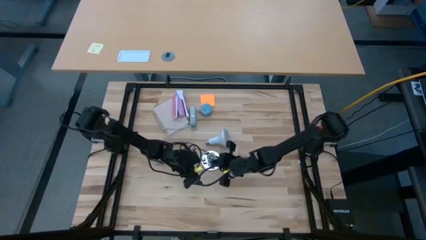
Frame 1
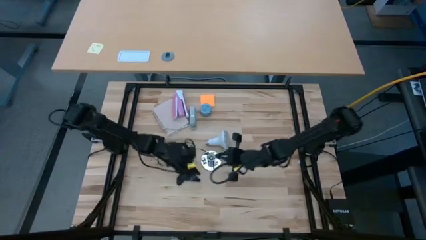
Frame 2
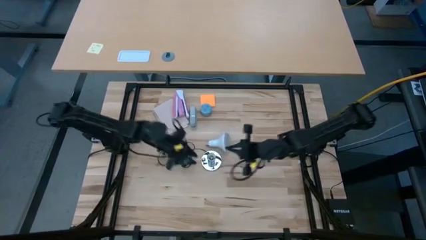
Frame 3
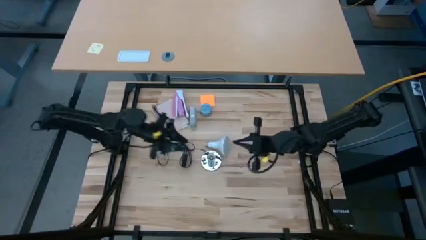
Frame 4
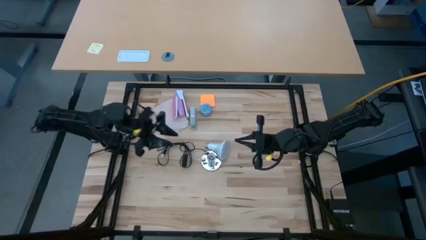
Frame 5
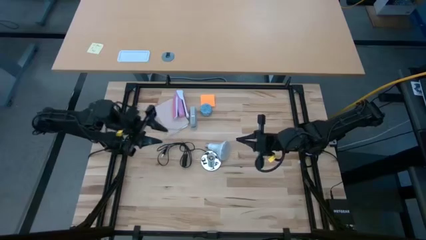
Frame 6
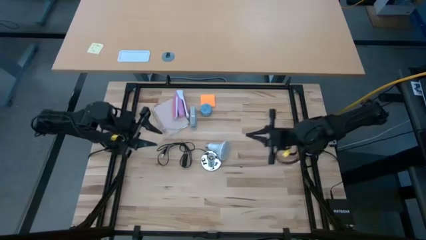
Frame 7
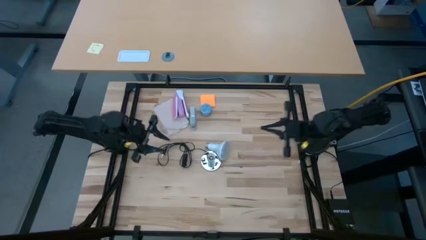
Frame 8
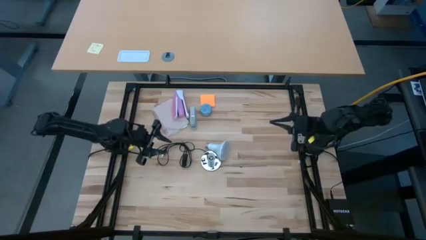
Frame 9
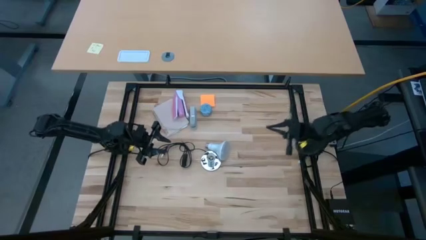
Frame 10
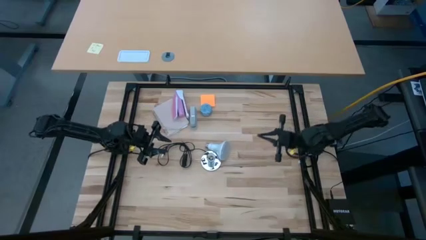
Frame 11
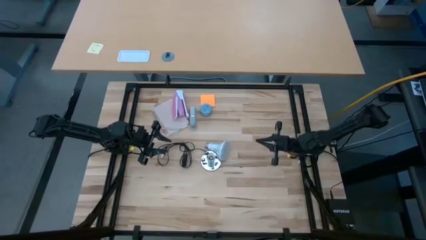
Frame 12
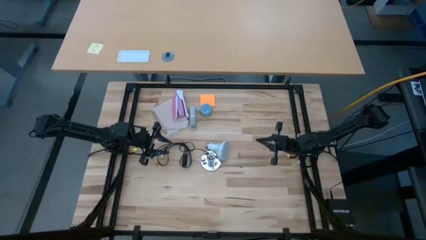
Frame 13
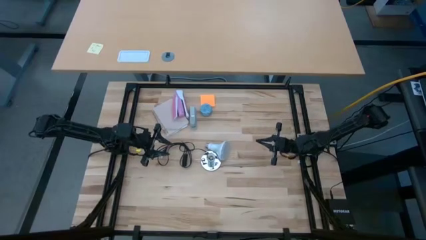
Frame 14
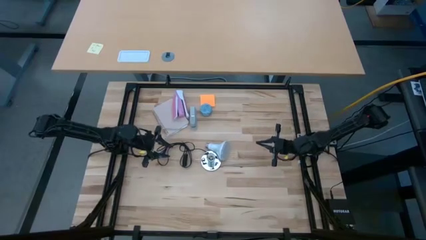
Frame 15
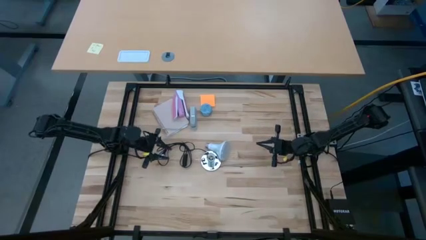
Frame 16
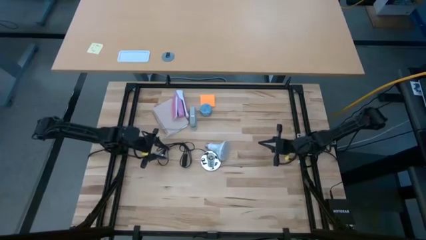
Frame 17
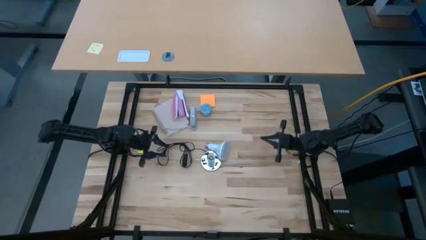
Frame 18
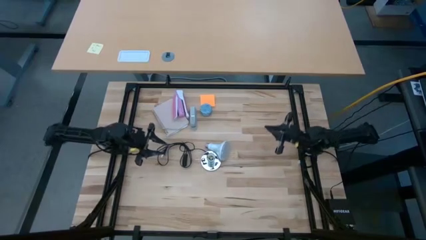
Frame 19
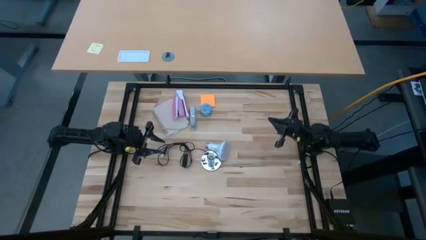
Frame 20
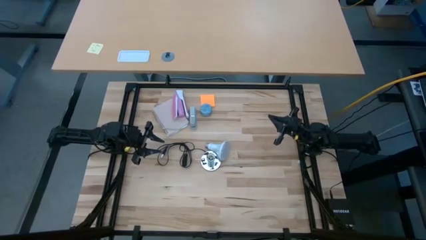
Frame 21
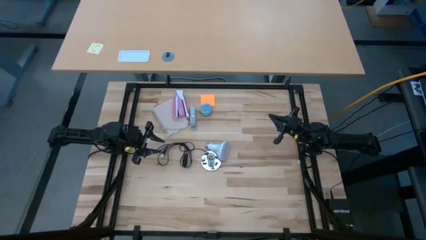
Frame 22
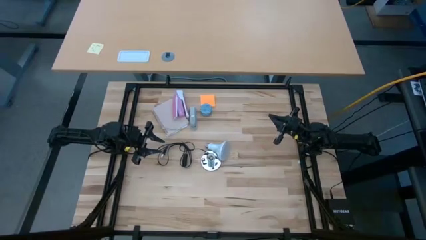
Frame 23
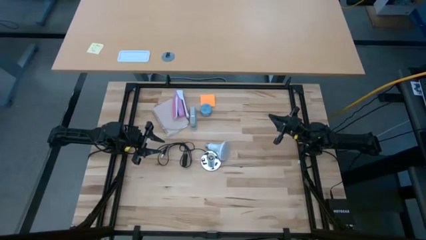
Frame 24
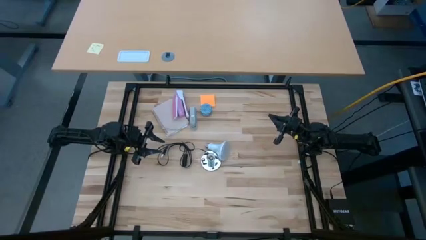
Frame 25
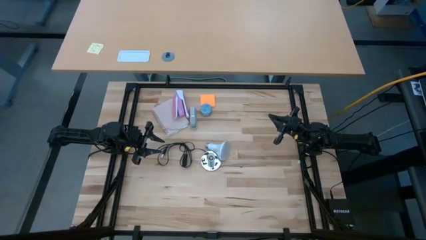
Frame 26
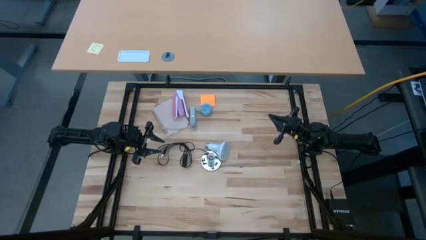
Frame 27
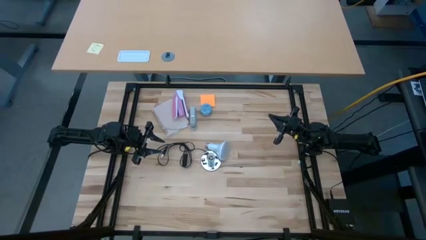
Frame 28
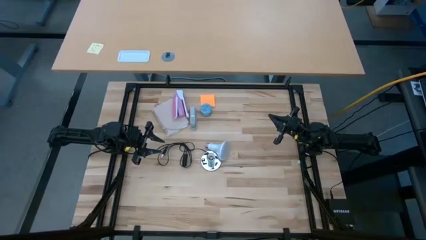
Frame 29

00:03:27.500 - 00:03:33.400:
Task: Screw lightbulb
Return to Home Position

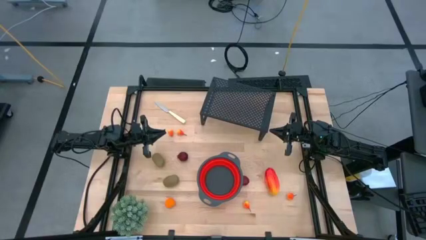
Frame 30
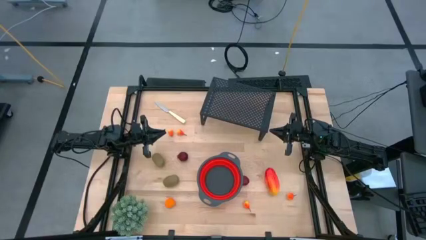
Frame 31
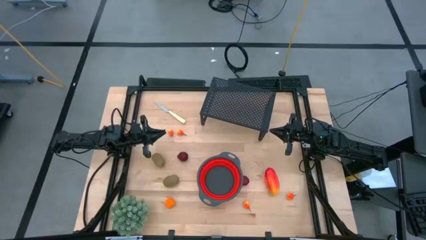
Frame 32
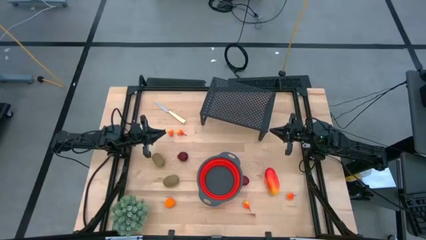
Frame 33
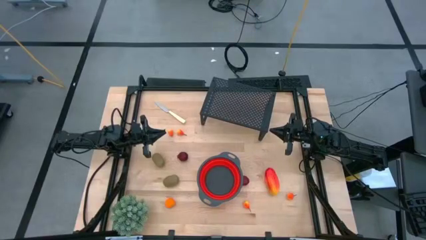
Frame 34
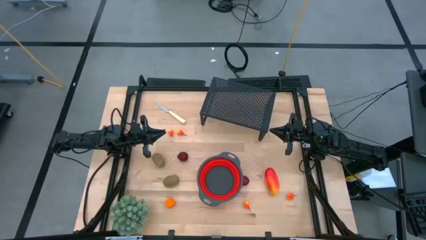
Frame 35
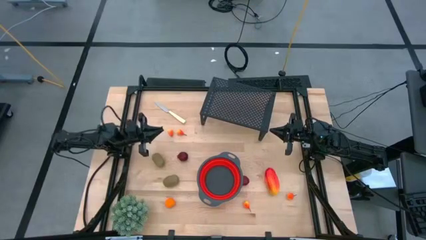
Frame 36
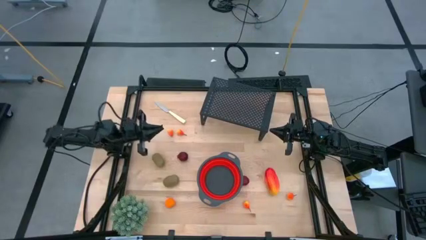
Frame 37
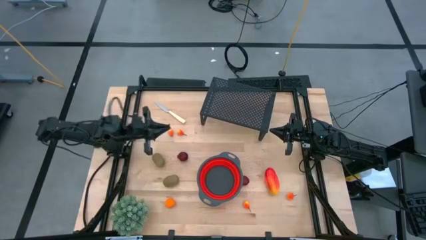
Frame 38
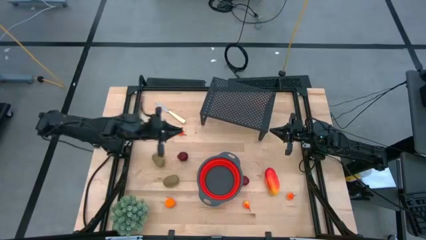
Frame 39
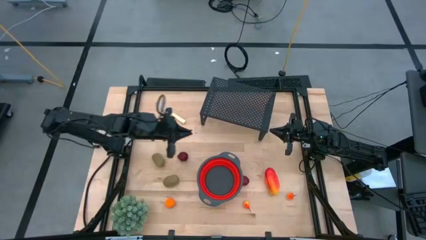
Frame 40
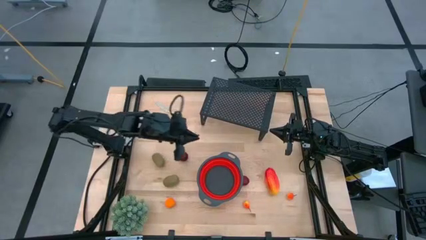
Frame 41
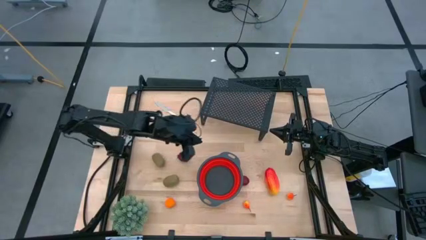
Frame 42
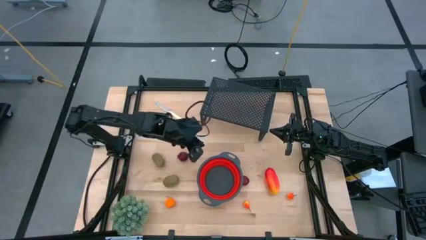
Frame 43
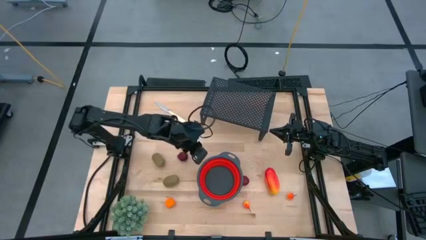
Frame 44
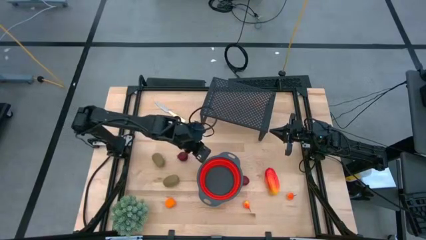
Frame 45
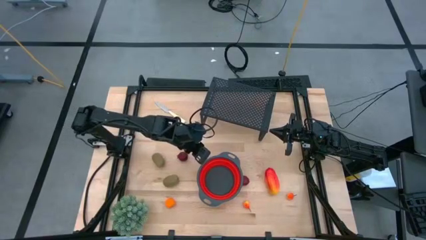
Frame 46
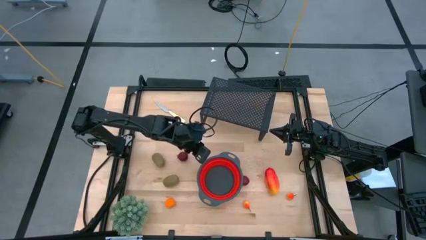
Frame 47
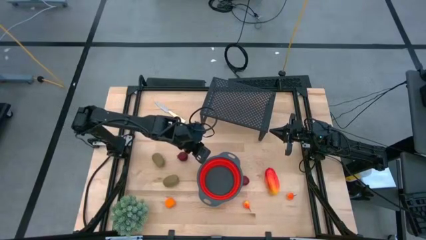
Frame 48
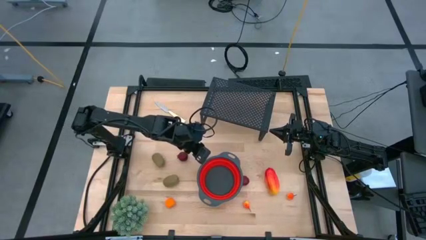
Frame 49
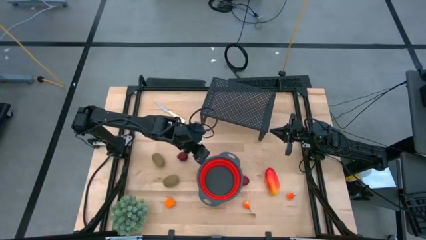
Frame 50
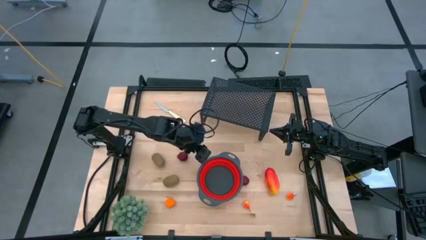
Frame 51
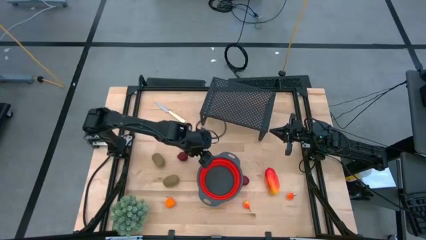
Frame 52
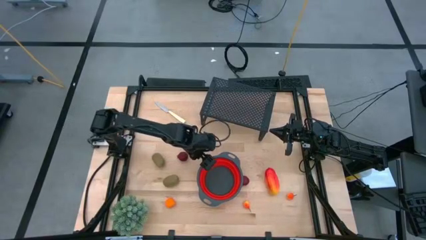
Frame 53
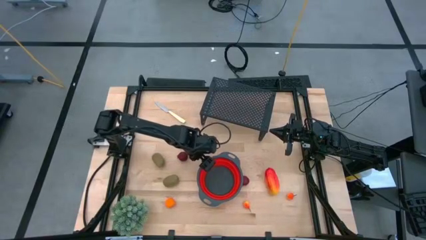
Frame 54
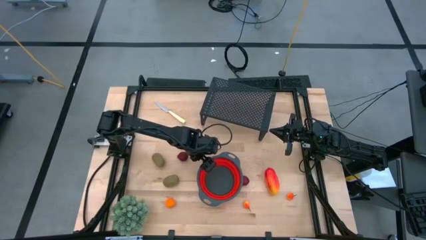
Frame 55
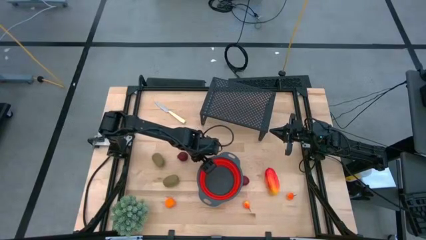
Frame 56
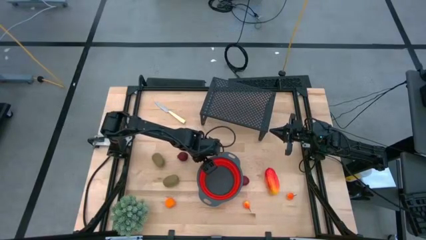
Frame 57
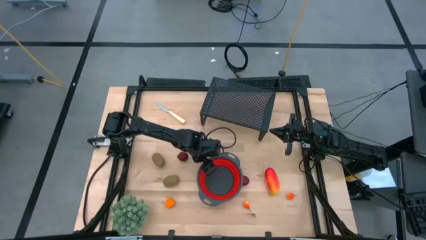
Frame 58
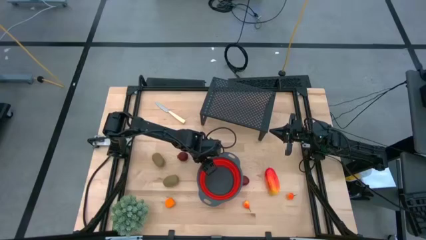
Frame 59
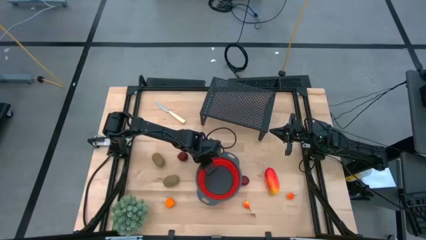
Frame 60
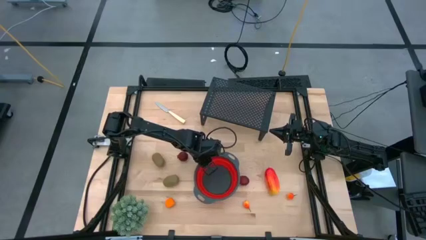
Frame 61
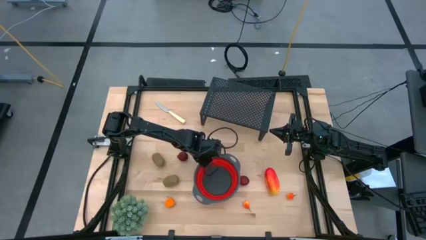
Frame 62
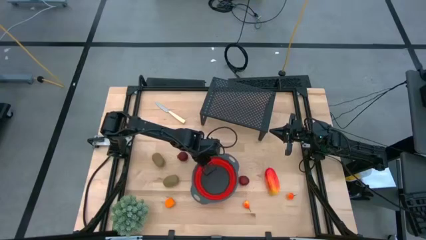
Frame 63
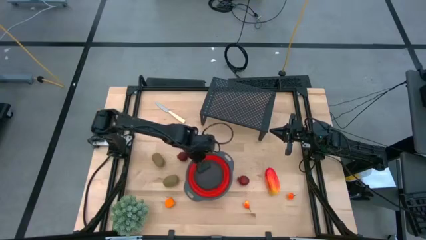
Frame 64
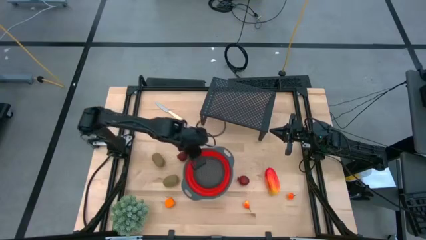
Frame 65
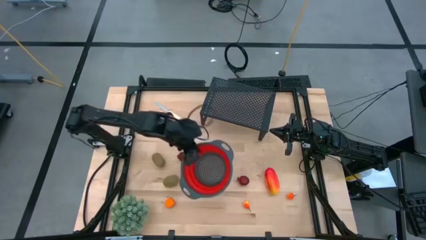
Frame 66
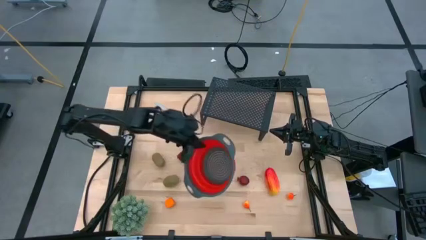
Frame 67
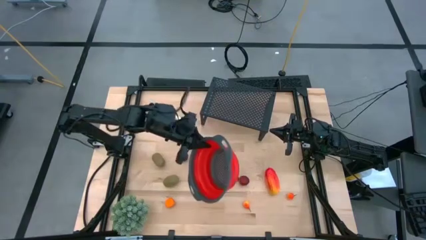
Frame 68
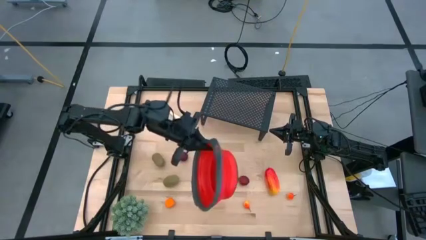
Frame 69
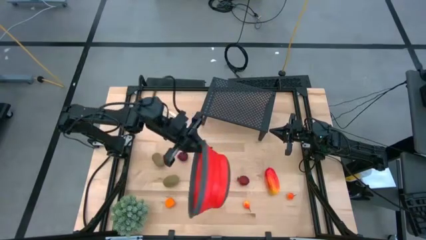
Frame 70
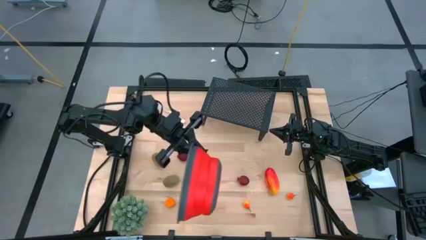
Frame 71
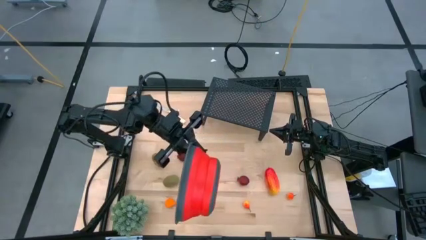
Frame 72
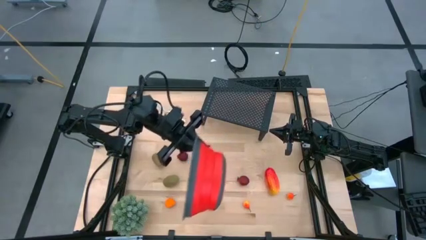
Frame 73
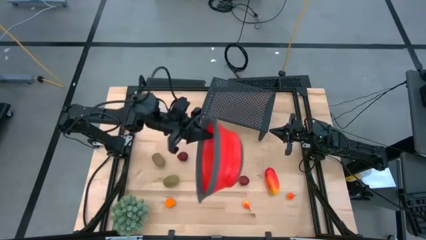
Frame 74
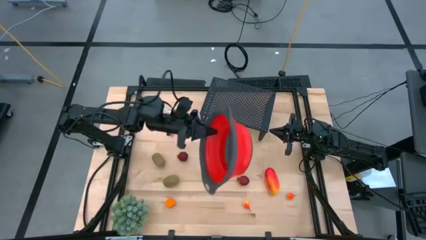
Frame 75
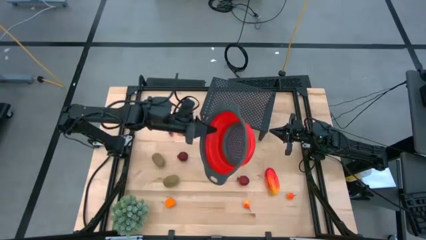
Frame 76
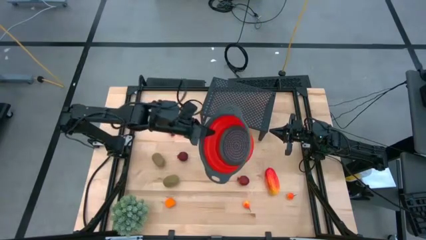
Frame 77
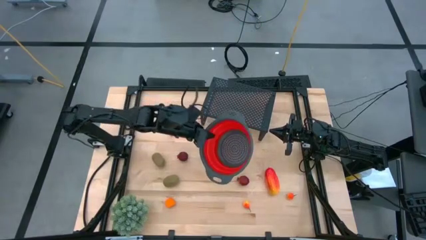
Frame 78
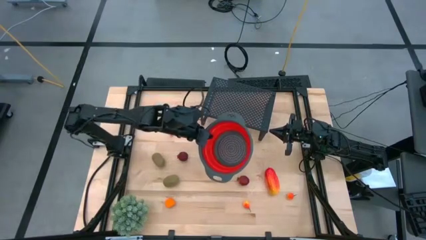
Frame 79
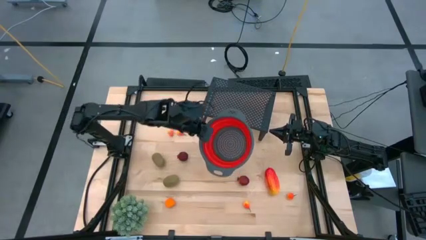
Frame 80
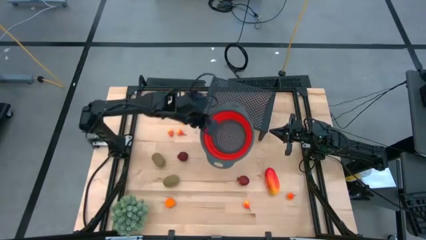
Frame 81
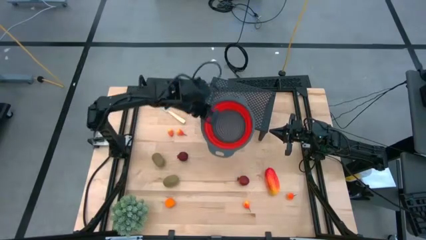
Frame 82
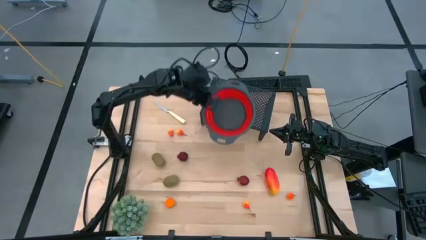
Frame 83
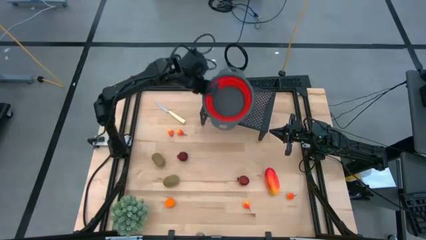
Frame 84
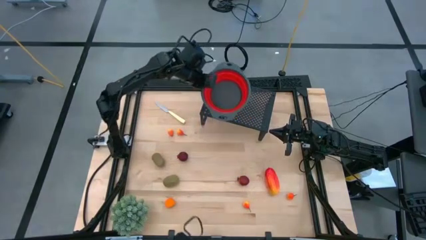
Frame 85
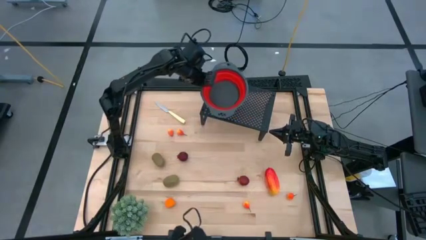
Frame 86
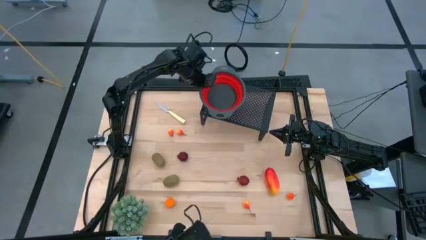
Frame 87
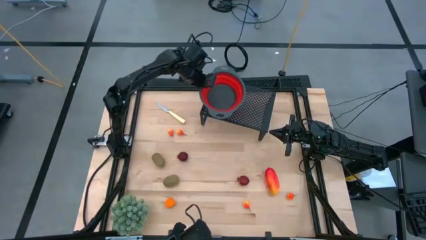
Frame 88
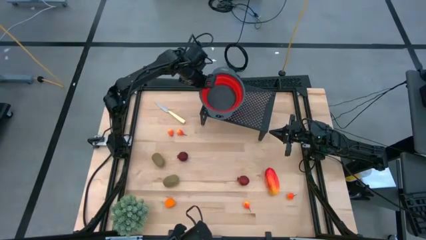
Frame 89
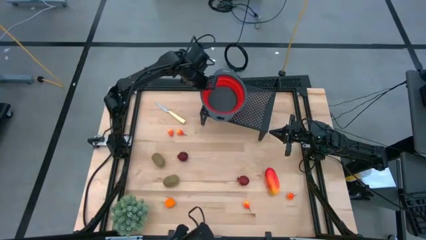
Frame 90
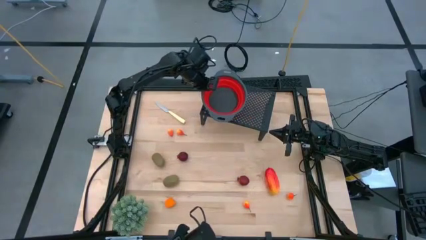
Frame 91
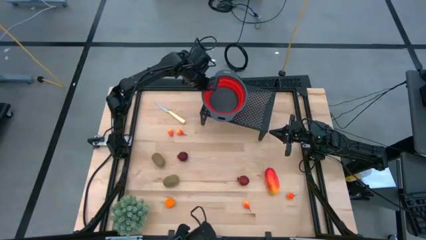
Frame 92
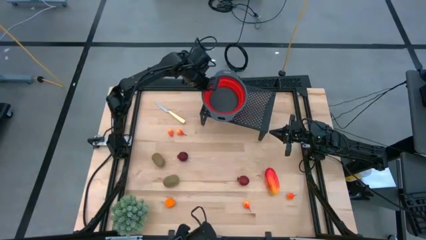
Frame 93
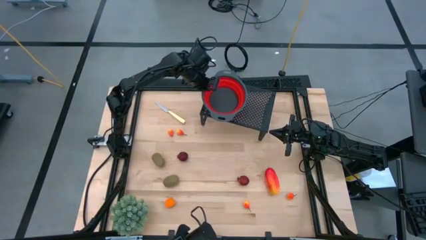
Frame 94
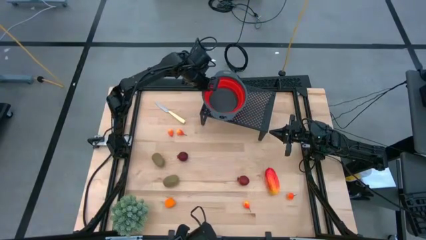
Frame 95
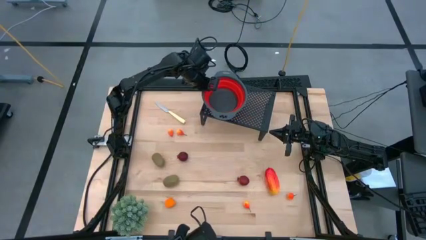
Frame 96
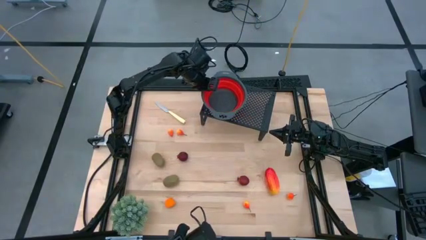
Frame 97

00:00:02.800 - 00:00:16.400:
Task: Pick & Place Fruit
Put the strainer bowl on the black shelf
